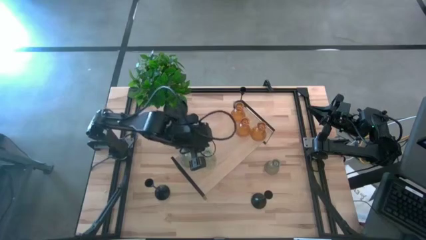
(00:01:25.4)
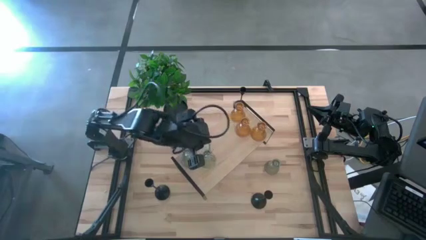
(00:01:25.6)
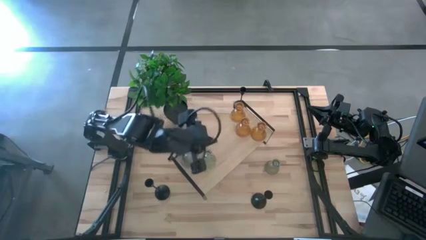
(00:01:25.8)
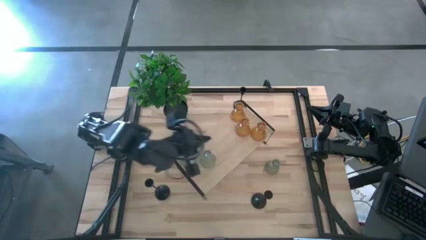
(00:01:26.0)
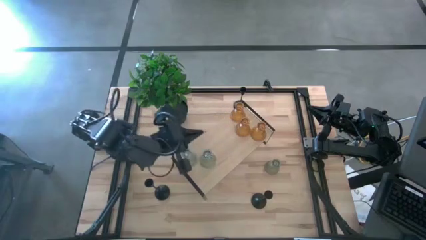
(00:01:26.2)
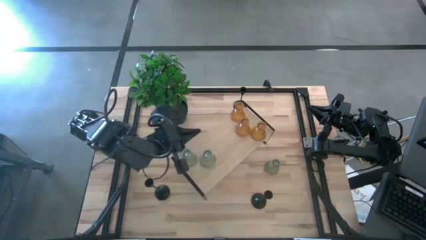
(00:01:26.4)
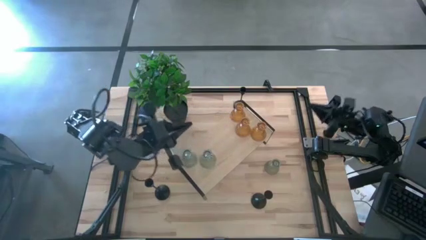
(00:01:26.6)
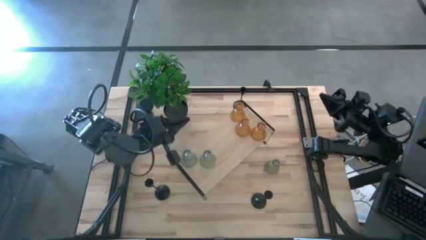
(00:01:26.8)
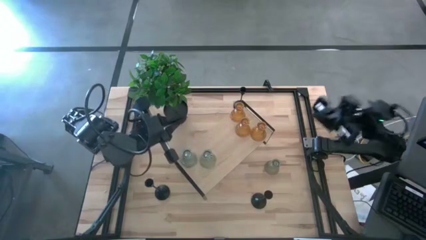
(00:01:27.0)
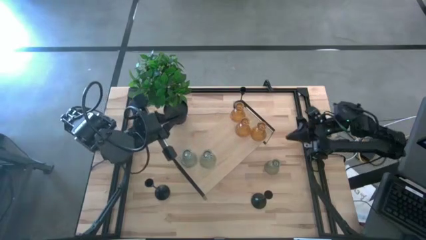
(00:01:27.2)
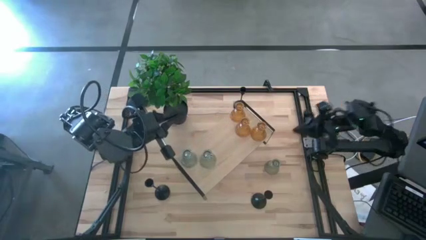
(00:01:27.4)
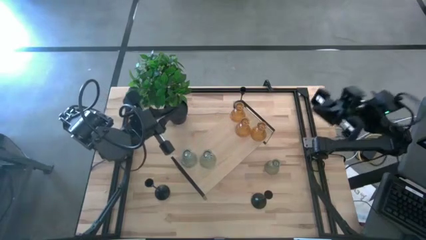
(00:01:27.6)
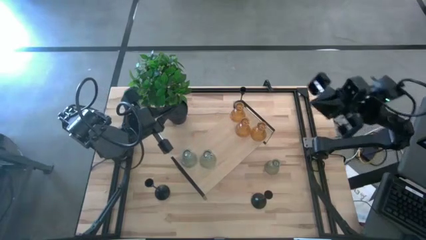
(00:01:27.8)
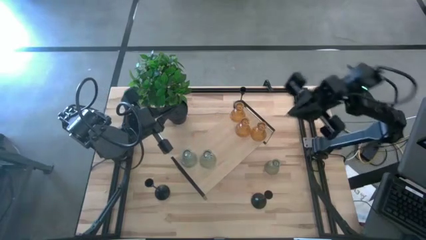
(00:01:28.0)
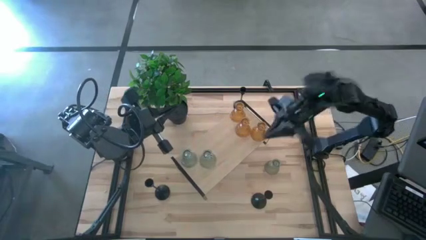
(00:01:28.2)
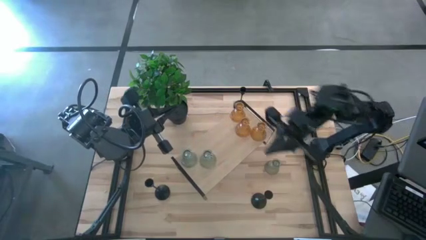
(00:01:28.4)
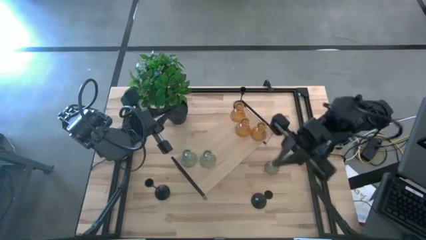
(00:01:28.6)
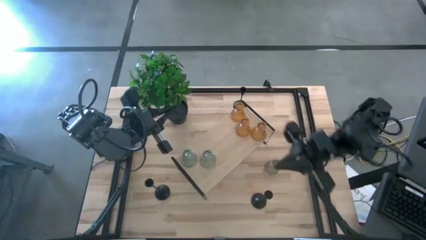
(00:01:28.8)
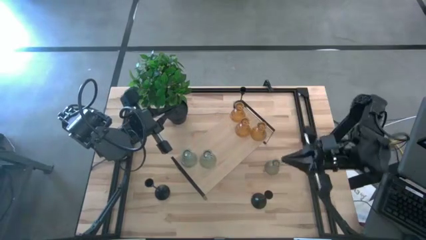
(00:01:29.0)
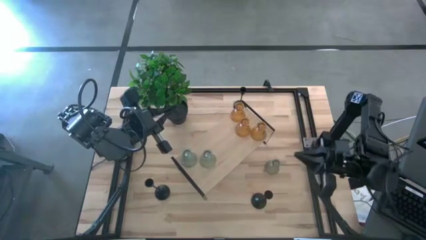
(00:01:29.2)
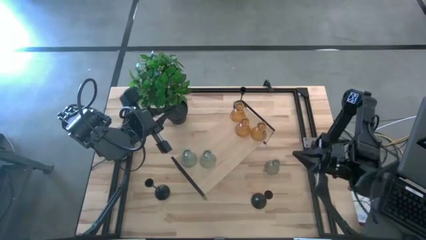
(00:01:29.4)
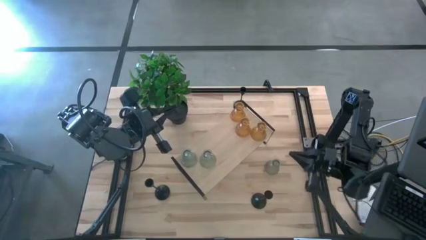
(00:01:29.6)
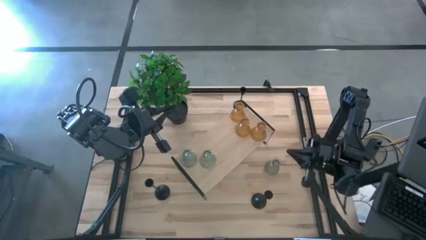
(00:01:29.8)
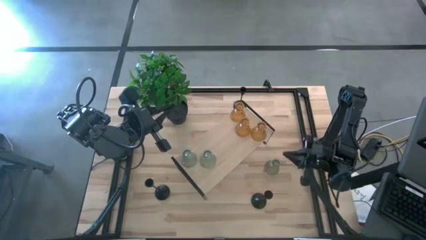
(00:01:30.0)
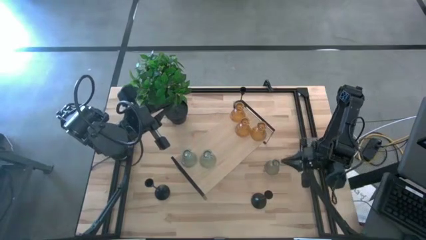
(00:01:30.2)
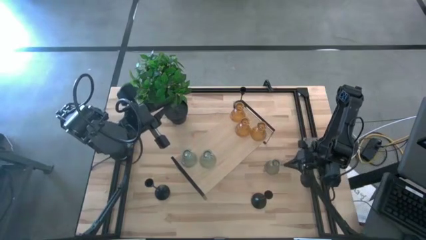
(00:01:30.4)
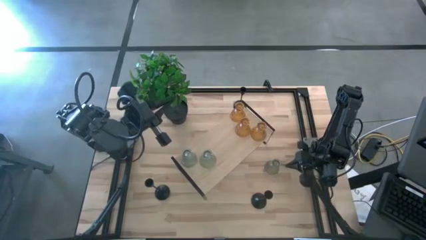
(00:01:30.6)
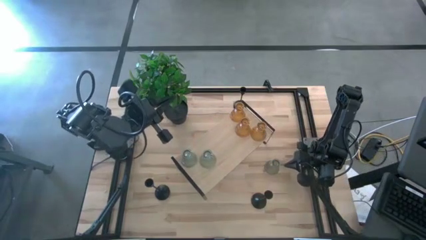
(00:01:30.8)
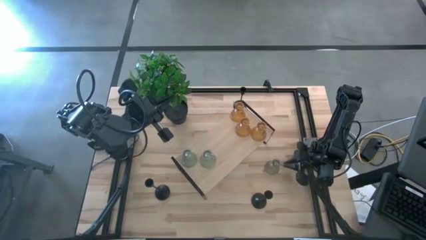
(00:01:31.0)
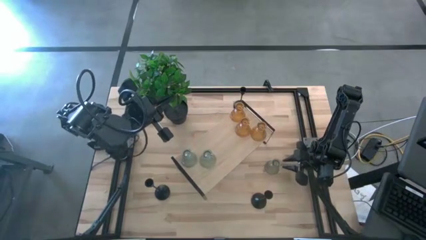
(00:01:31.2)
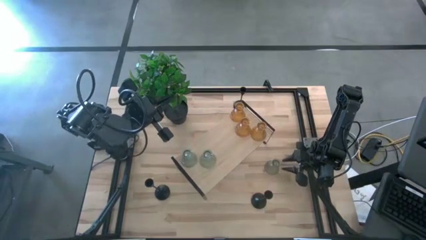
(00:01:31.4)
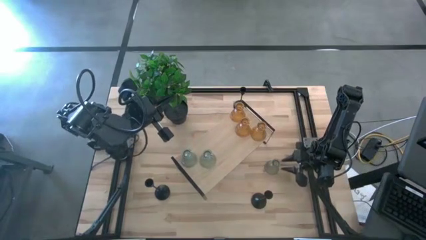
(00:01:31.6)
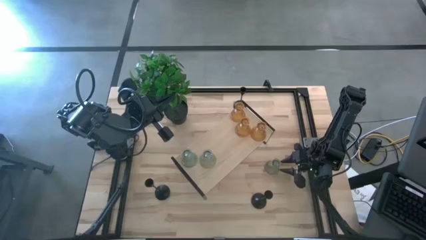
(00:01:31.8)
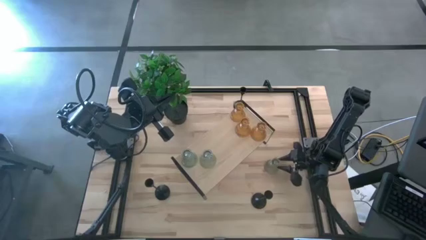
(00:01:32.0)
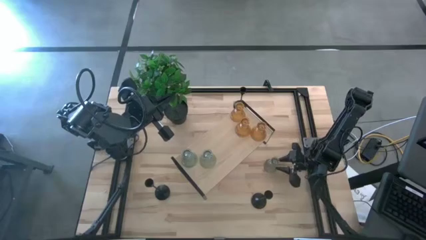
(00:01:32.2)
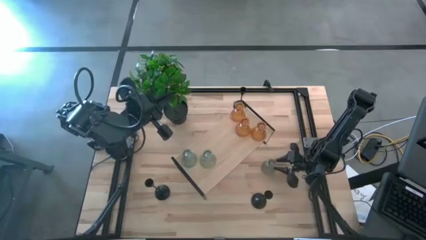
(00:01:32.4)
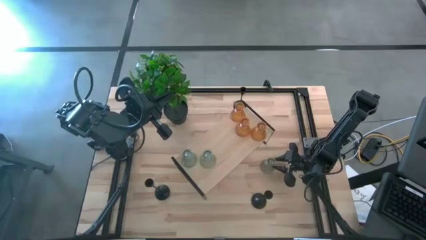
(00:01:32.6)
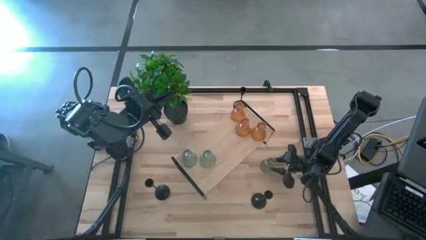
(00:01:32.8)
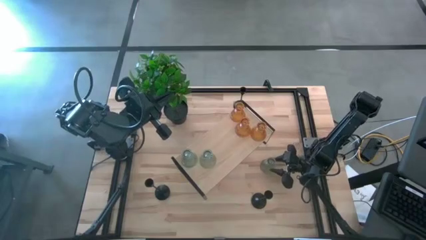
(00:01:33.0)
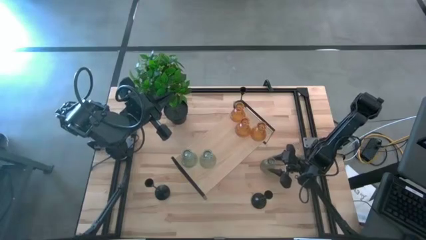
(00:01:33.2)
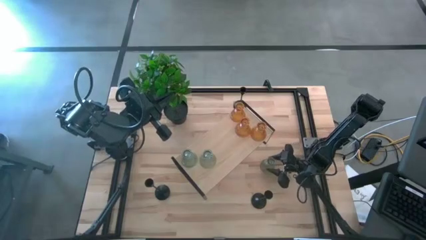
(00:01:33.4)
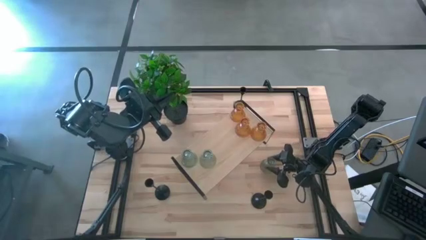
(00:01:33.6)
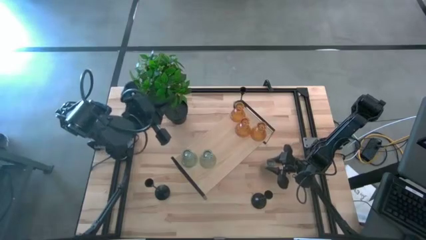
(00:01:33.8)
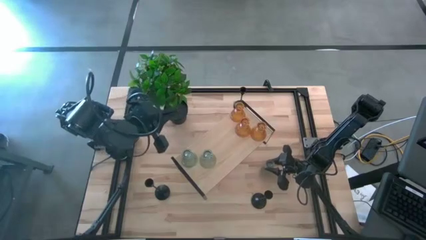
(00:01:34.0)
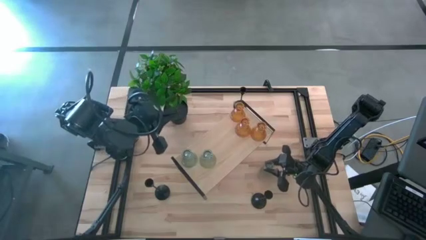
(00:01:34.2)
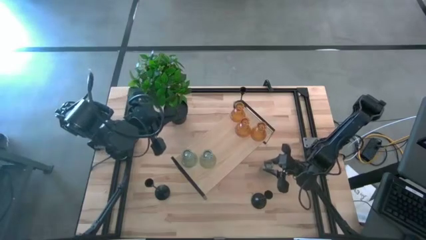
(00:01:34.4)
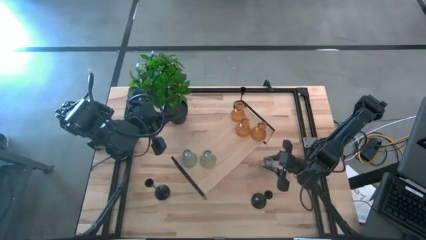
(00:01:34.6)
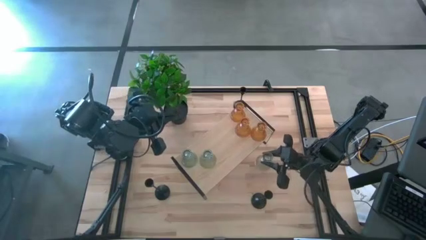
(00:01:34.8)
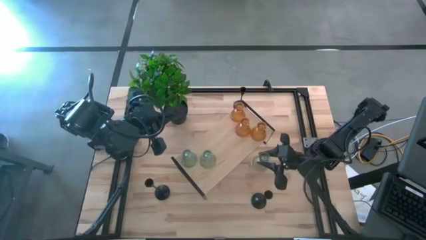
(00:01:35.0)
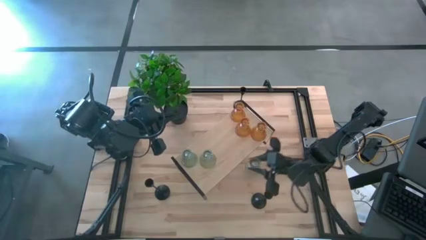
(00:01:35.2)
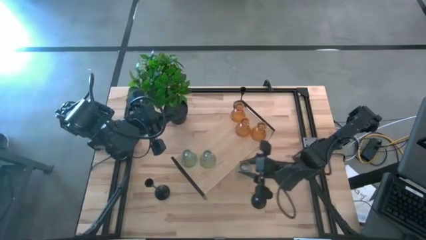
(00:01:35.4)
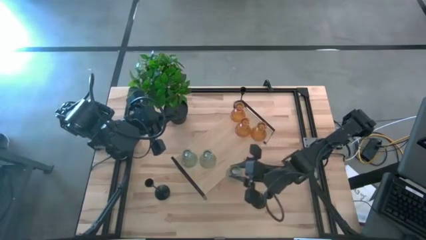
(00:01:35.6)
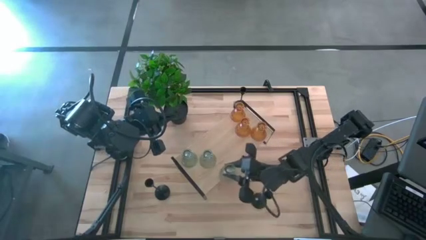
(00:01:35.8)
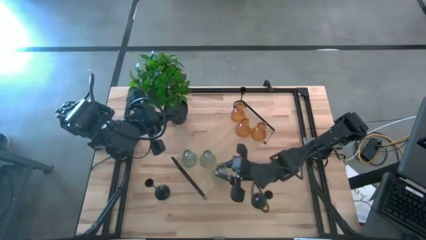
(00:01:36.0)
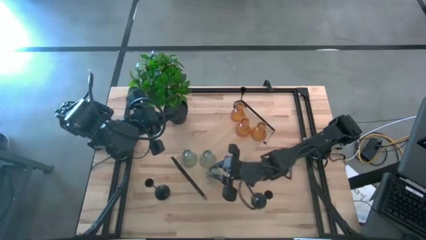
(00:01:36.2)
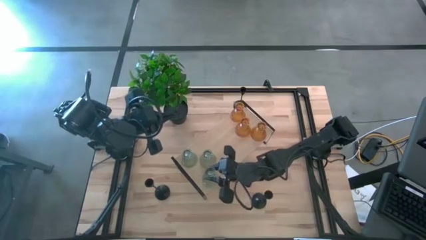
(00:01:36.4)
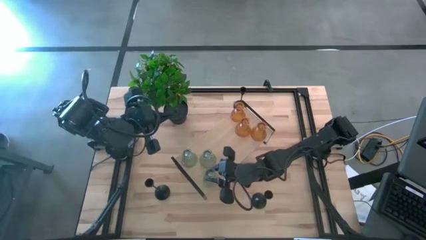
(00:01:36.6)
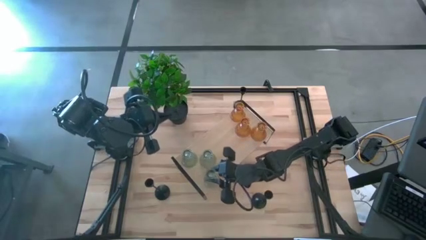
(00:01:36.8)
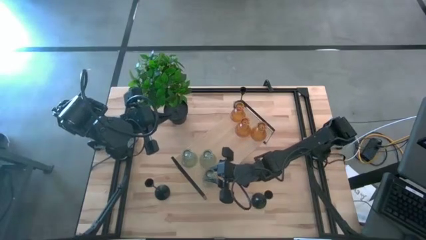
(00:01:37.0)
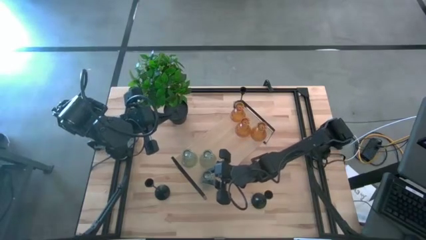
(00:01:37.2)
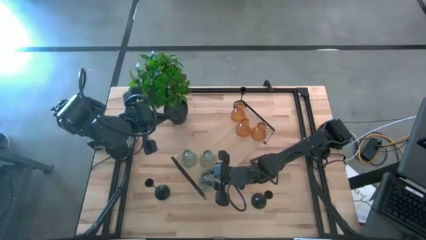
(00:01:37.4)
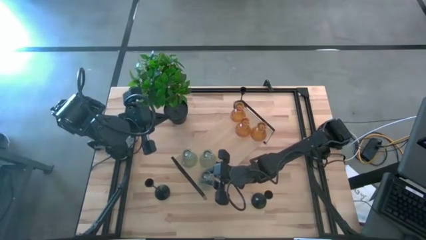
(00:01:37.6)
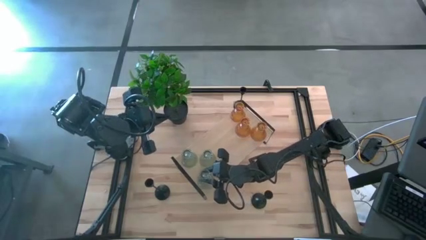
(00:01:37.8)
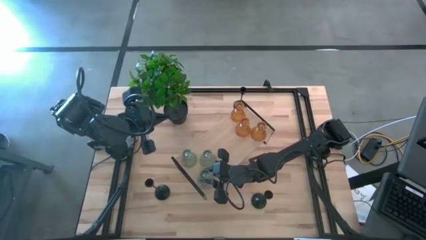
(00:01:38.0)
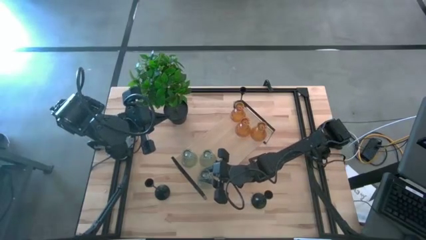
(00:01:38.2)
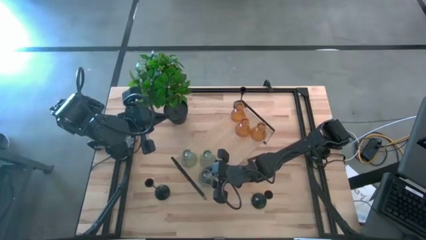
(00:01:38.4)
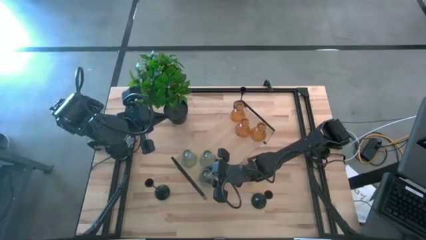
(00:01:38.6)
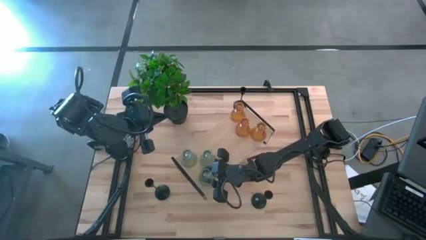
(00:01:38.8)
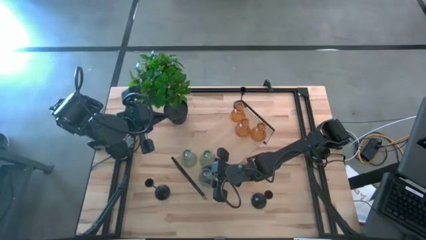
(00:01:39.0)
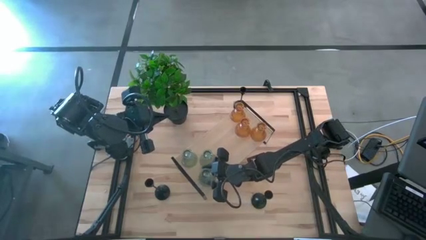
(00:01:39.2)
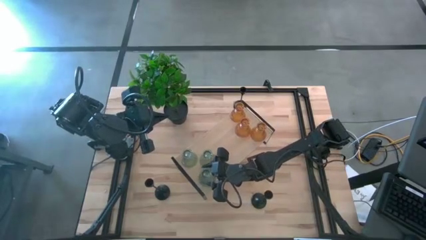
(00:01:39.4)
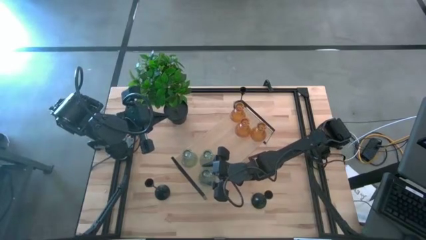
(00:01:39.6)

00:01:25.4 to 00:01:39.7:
Task: Pick & Place candle stick holders
Put the transparent glass candle holder on the shelf
